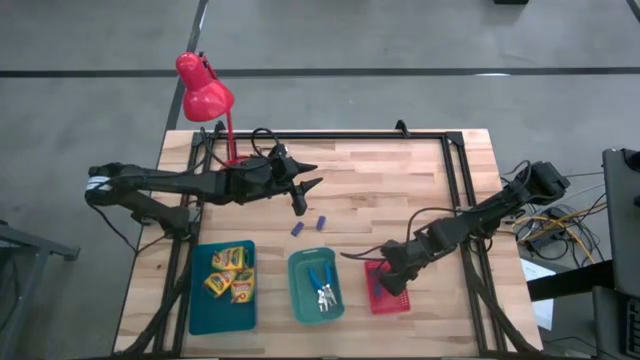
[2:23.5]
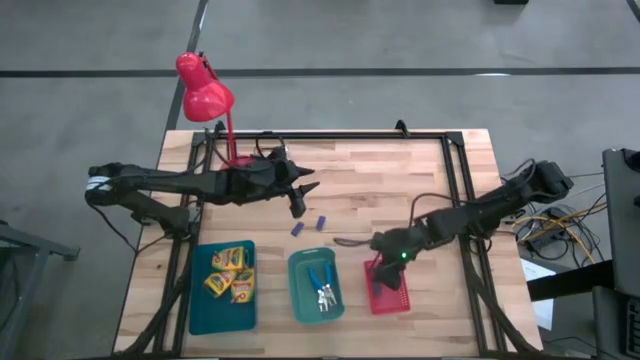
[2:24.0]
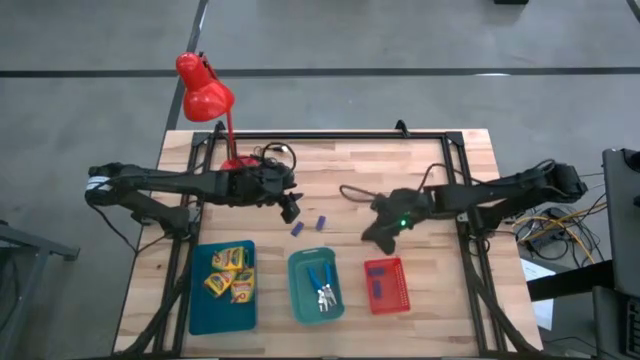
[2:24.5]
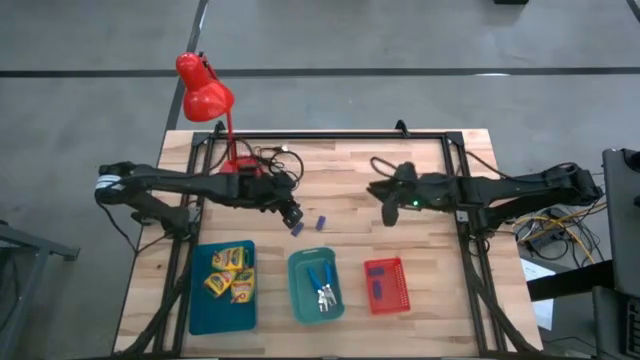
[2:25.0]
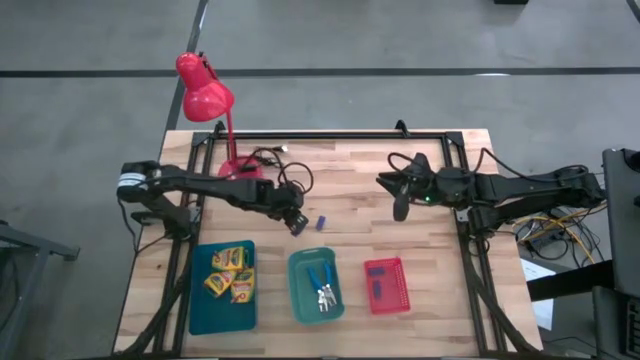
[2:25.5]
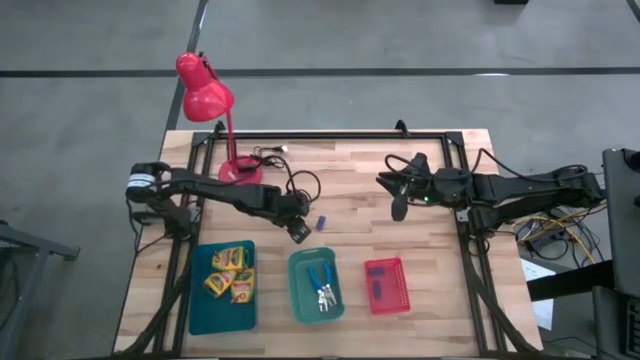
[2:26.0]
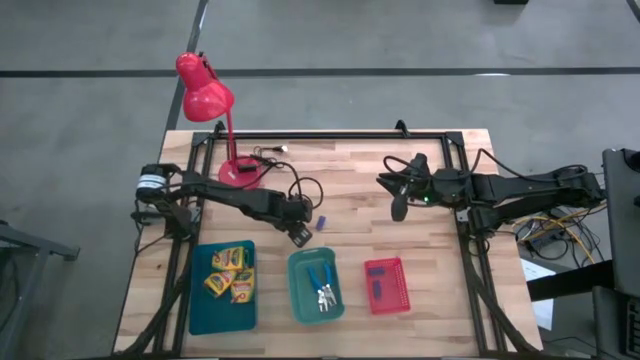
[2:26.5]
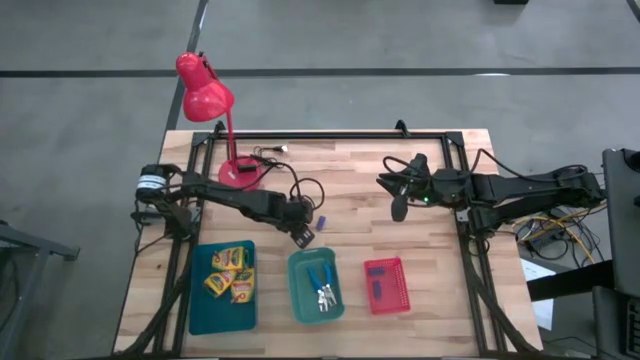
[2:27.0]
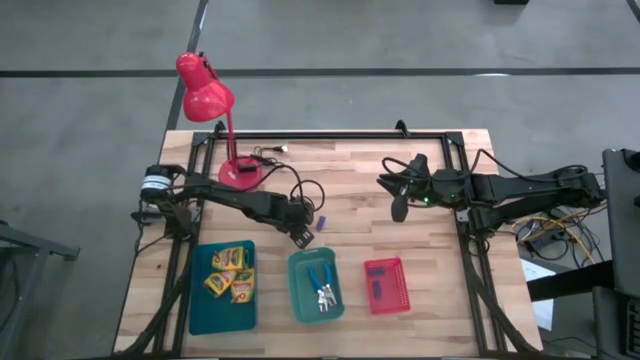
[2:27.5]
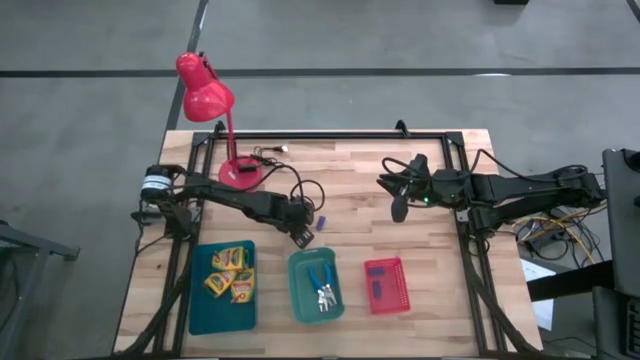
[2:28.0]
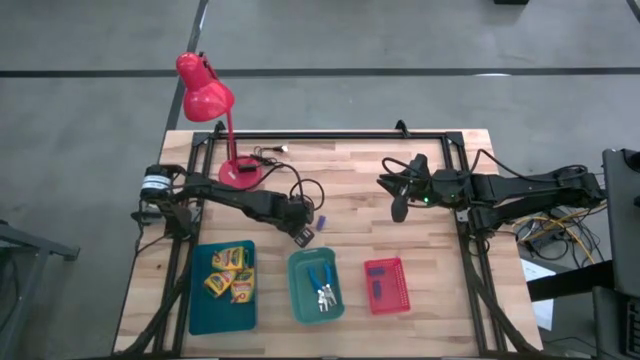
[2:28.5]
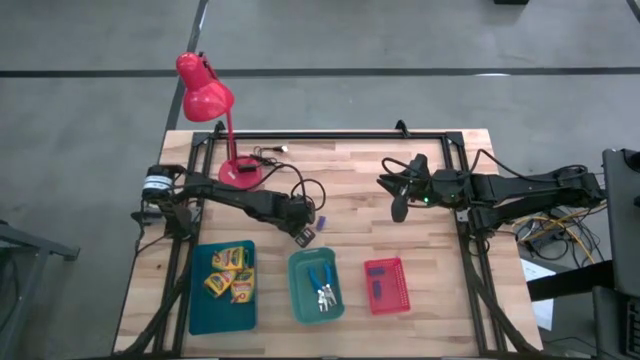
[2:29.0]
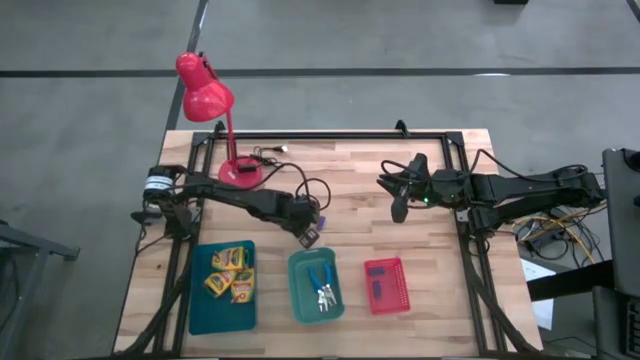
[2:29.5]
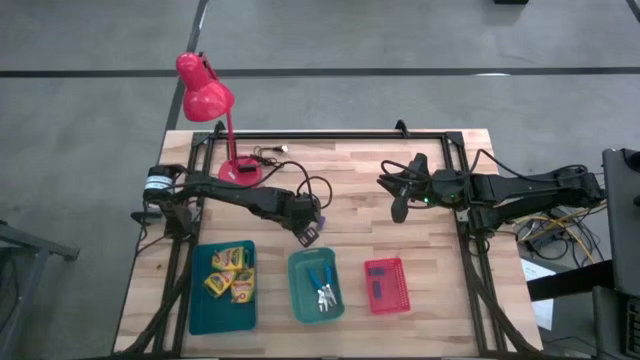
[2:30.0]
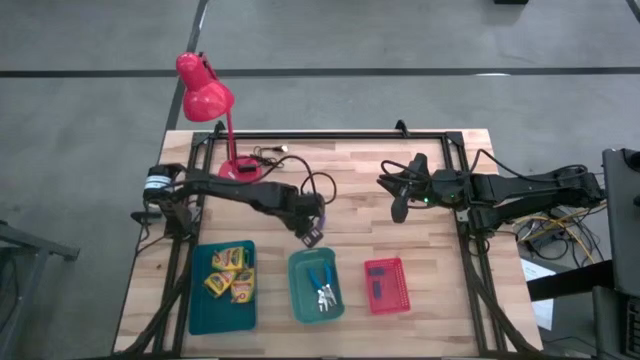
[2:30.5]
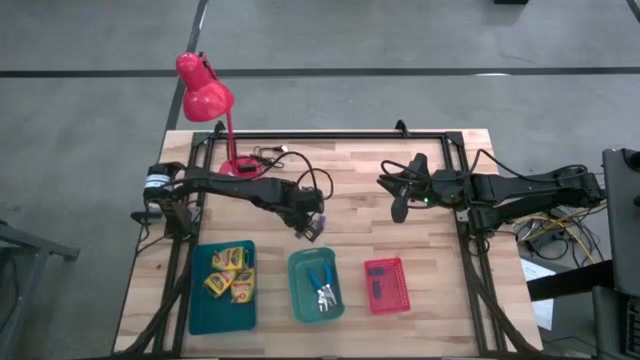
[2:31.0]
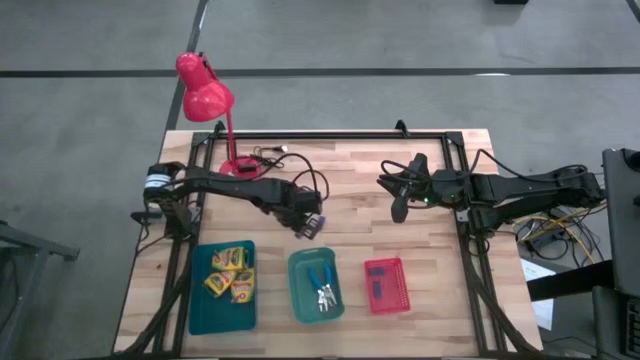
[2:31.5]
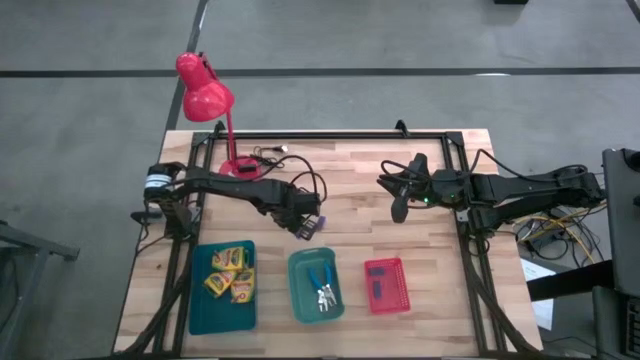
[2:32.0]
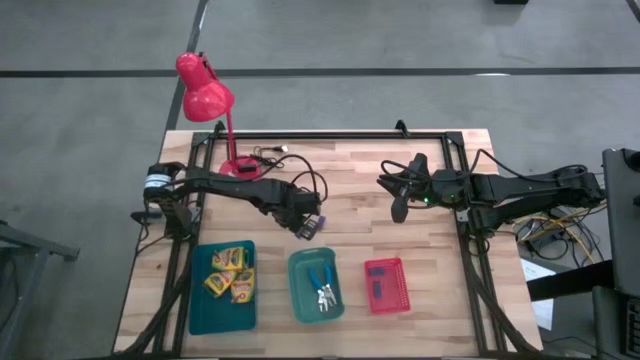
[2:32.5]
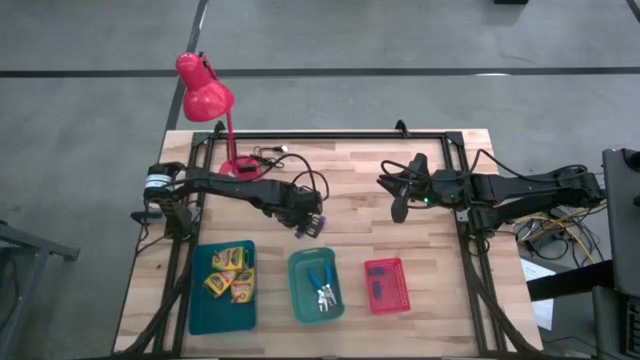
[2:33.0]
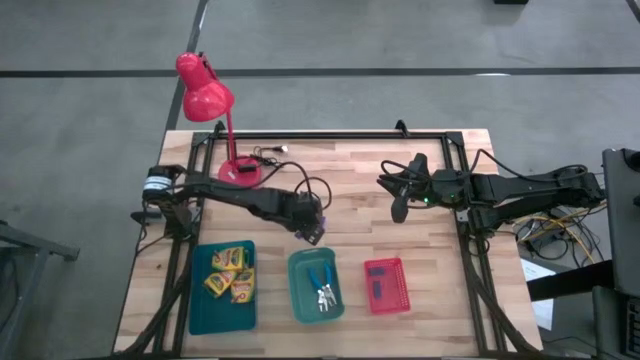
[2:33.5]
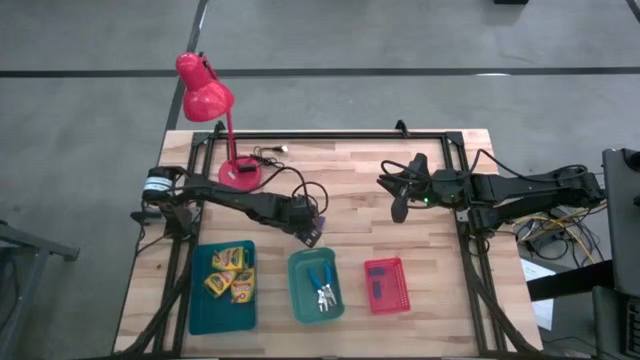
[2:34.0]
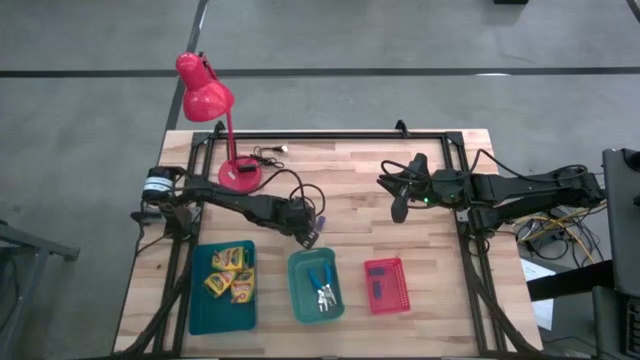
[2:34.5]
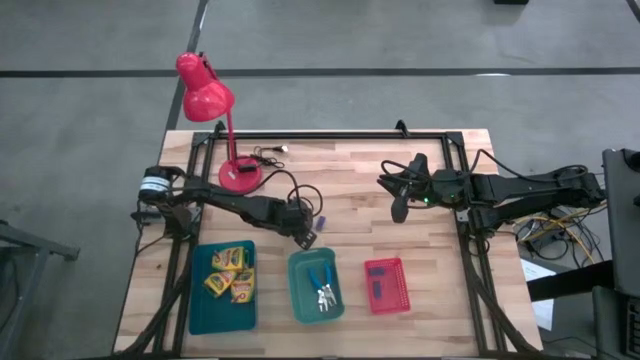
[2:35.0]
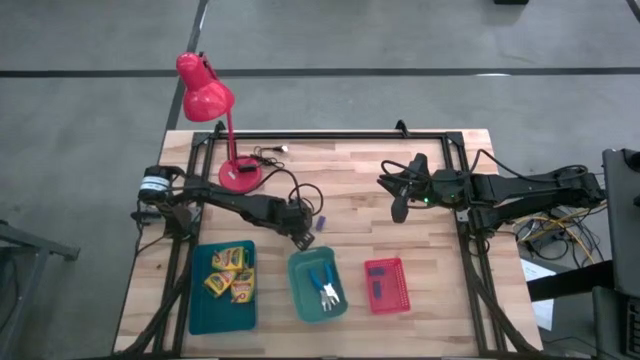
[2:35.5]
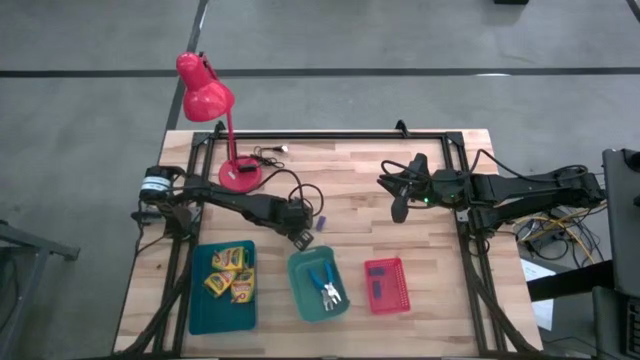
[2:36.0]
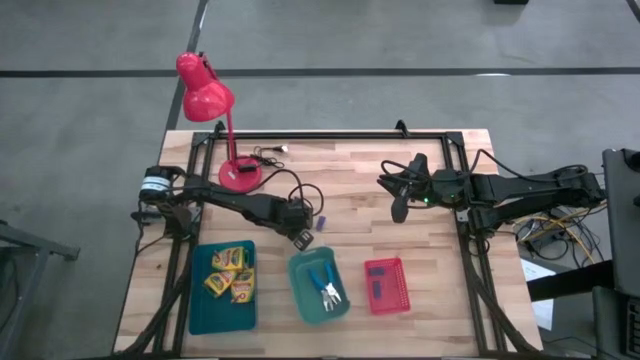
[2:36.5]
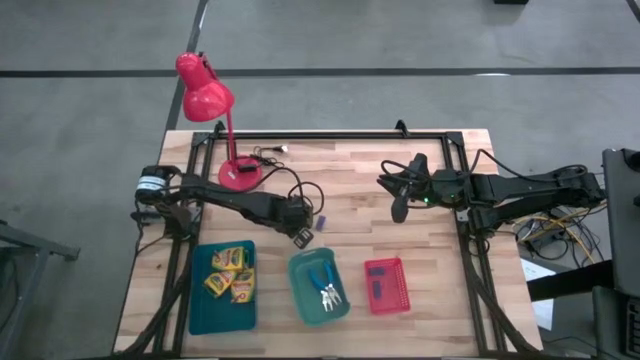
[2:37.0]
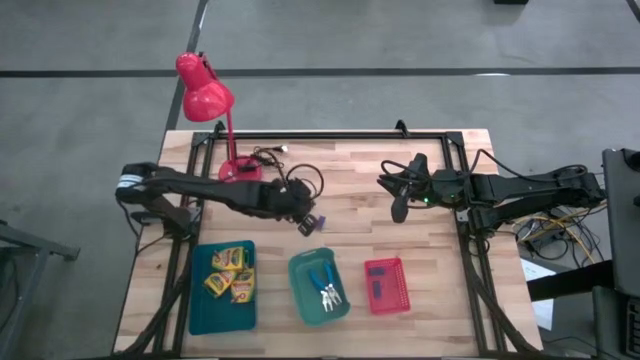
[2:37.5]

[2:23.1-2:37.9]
Task: Pick & Place School Supplies
Put the purple eraser into the red bin

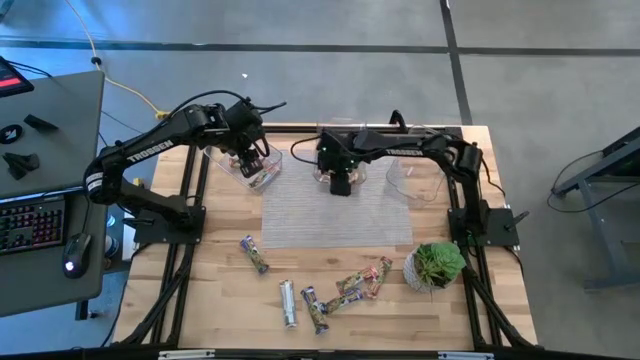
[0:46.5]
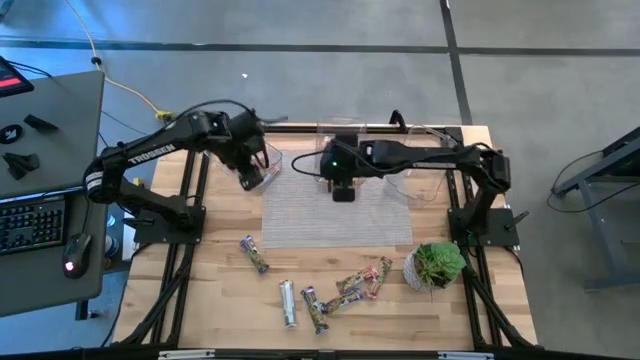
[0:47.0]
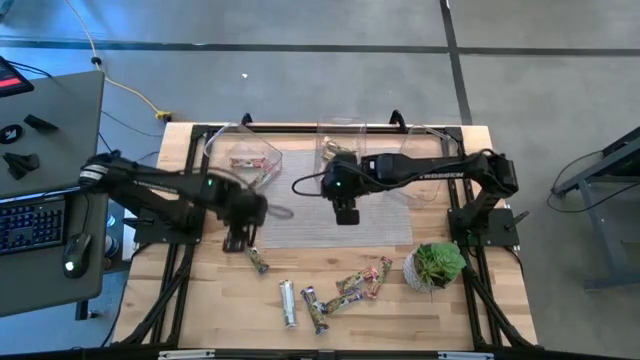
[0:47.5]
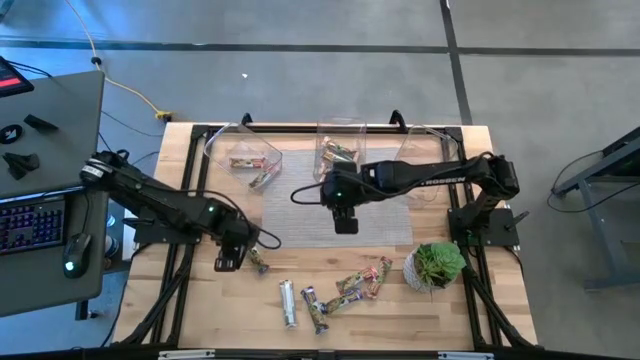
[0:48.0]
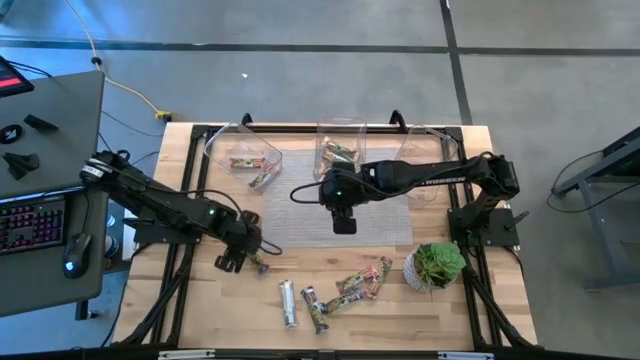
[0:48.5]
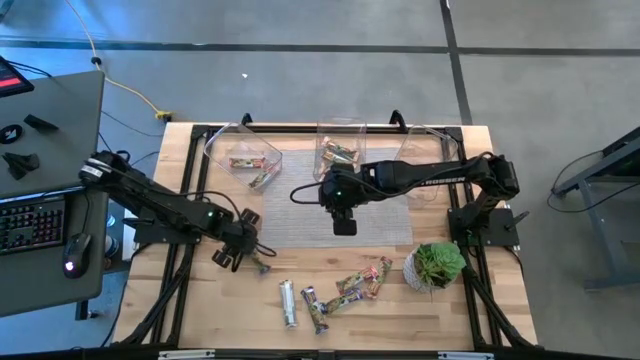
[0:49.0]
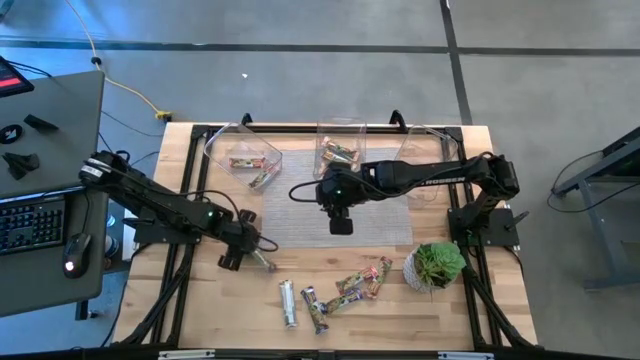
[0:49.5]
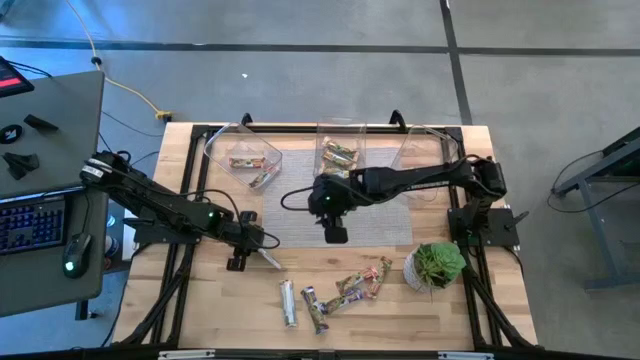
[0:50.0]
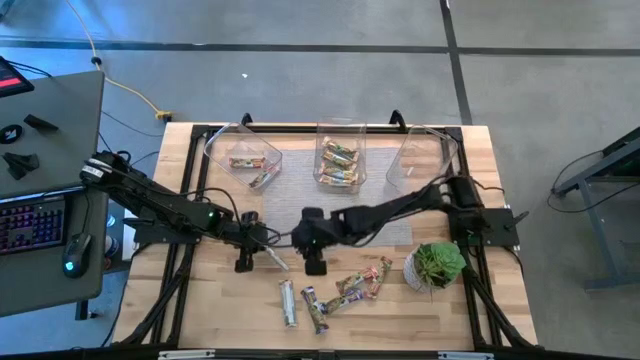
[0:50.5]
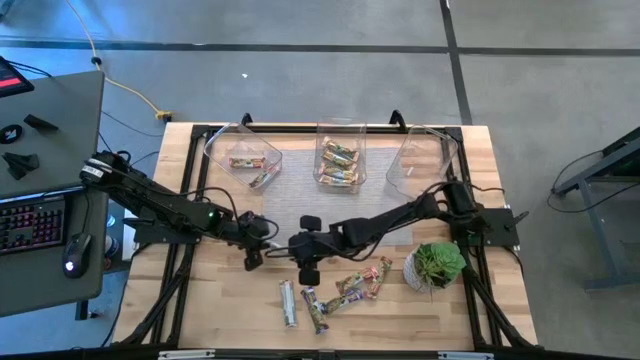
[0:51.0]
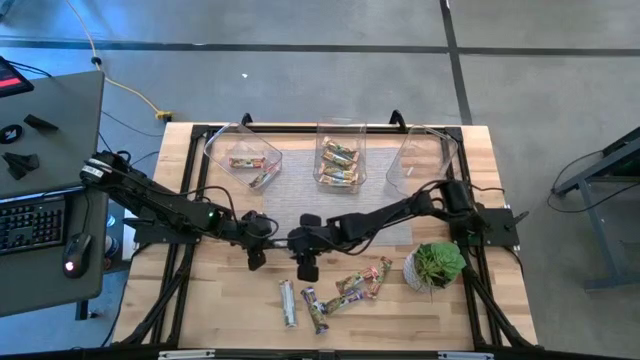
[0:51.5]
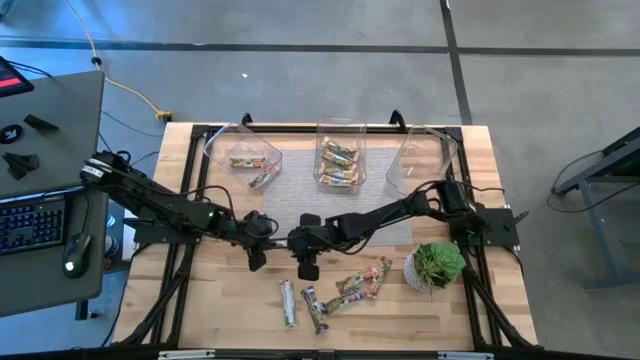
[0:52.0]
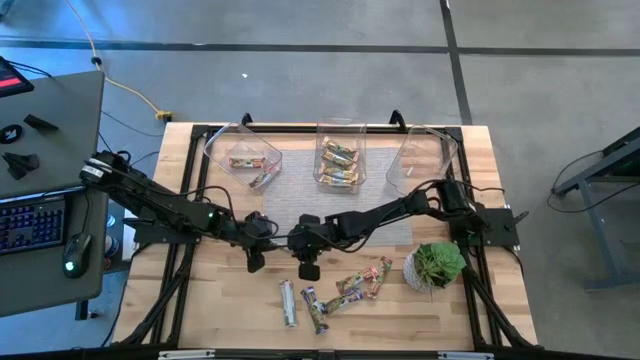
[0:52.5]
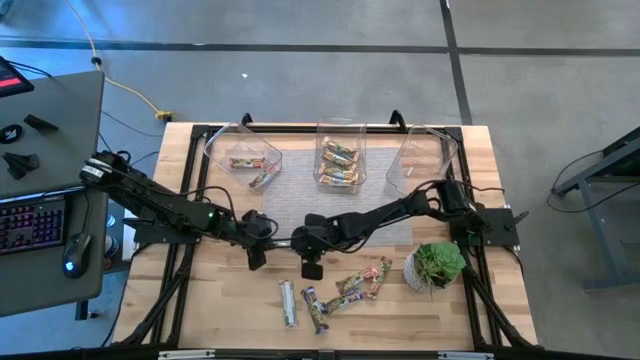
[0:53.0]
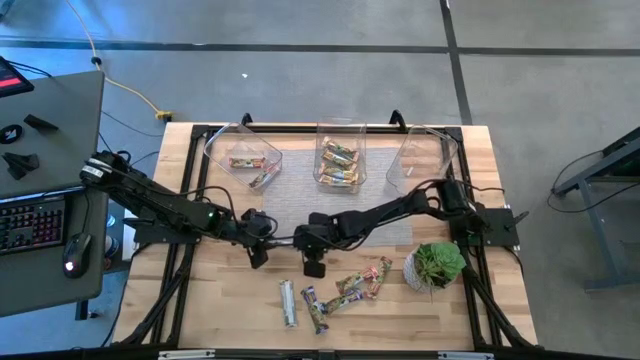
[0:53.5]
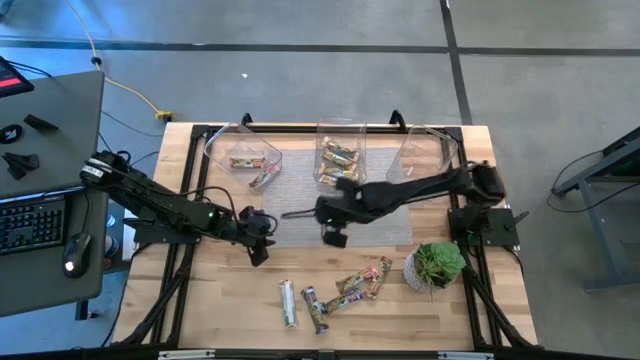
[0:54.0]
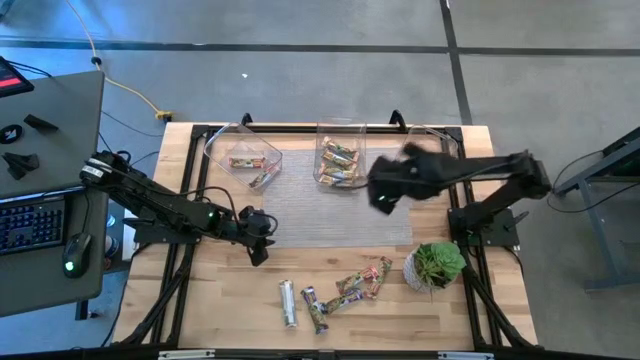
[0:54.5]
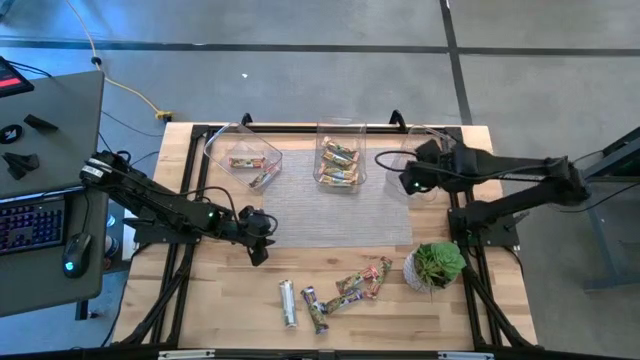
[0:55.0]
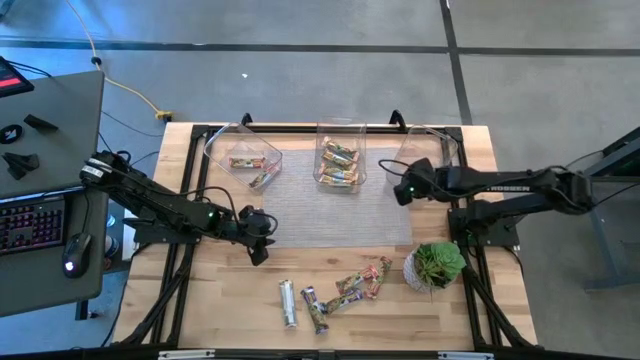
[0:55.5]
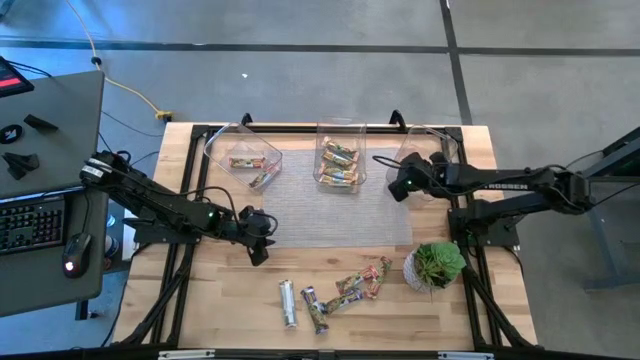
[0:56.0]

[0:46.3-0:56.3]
Task: Pick and place Granola Bars by type
Put the blue granola bar into the right transparent bin
